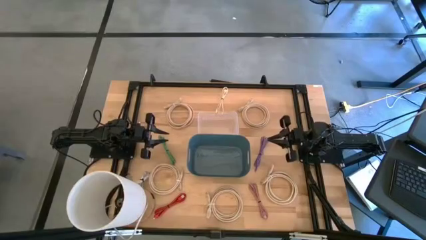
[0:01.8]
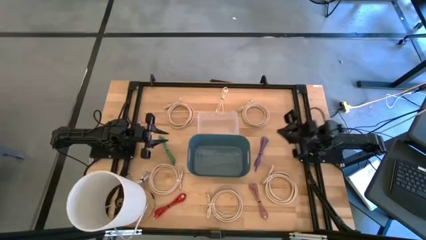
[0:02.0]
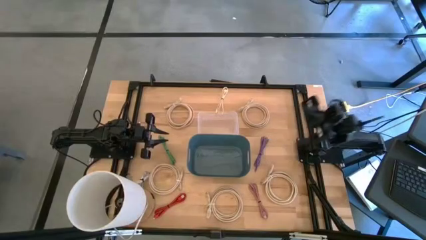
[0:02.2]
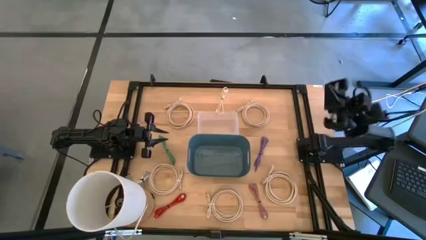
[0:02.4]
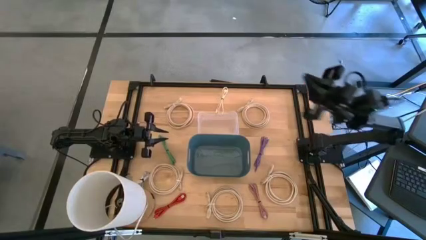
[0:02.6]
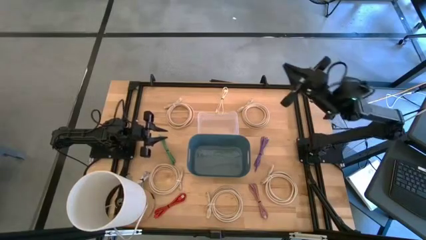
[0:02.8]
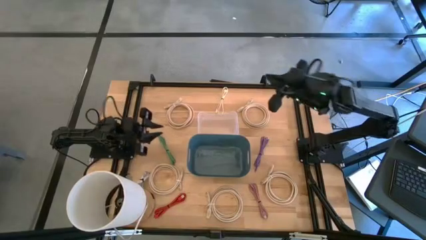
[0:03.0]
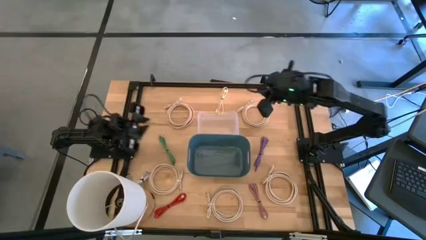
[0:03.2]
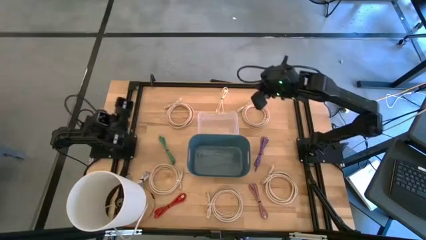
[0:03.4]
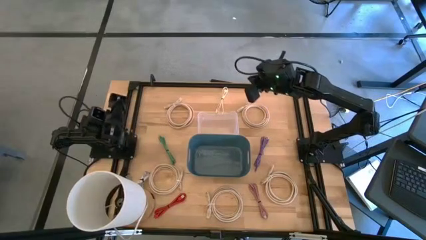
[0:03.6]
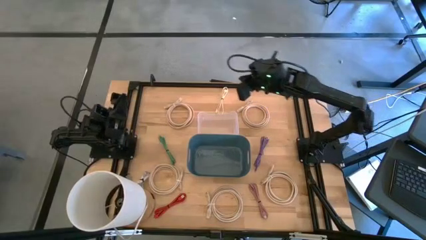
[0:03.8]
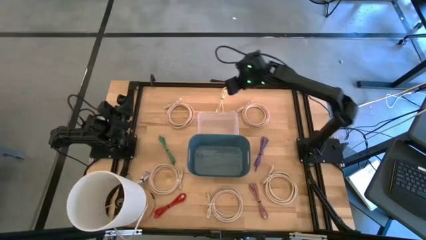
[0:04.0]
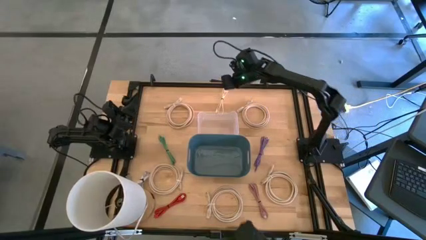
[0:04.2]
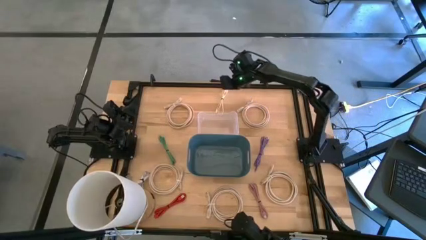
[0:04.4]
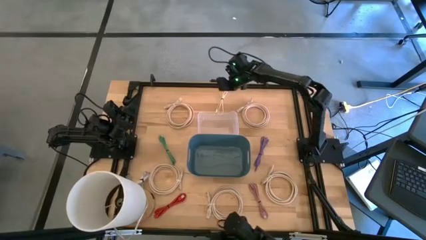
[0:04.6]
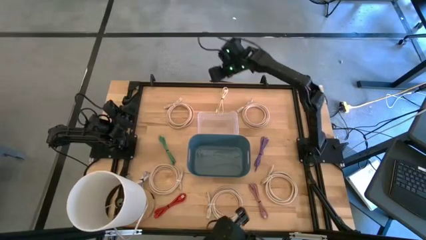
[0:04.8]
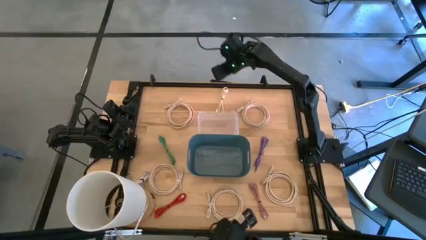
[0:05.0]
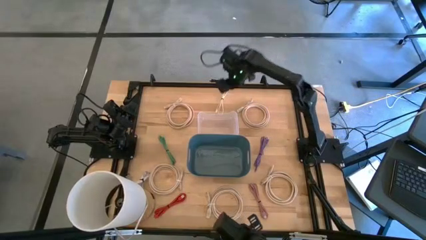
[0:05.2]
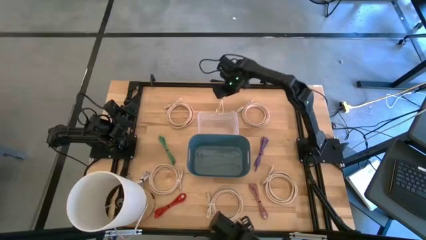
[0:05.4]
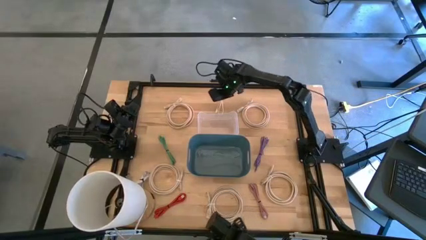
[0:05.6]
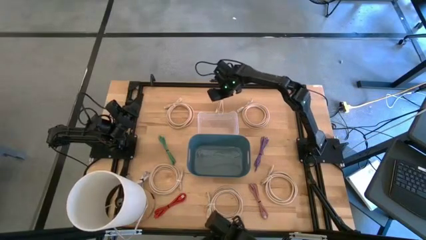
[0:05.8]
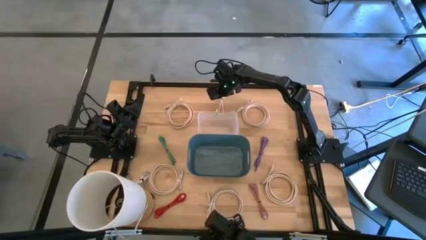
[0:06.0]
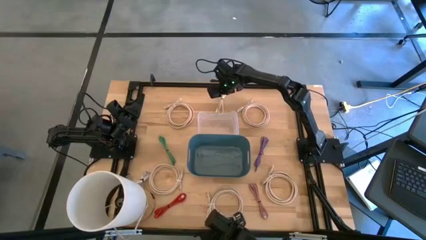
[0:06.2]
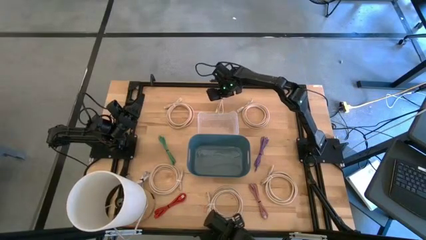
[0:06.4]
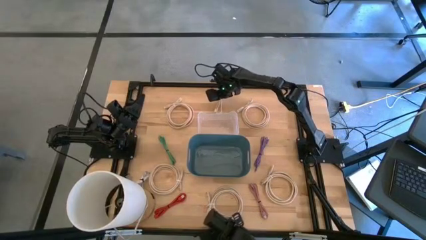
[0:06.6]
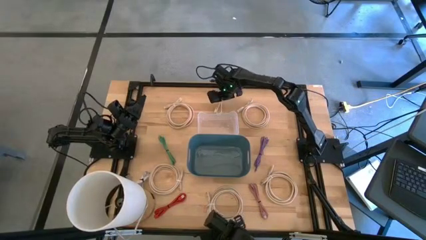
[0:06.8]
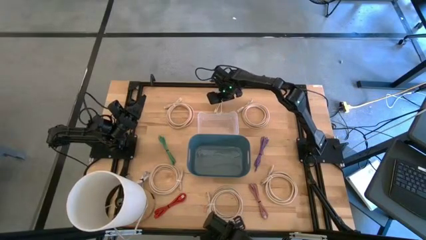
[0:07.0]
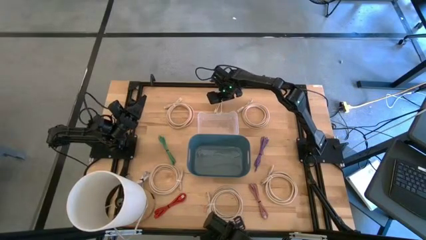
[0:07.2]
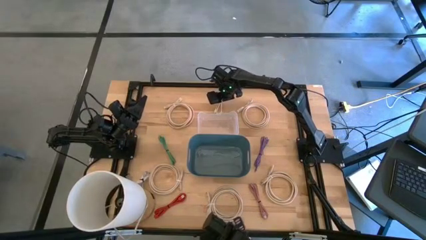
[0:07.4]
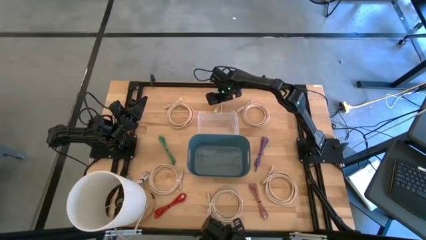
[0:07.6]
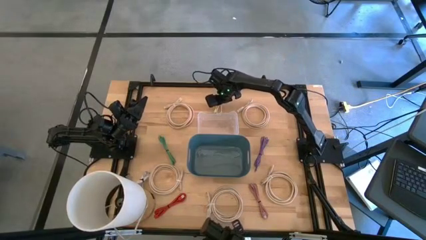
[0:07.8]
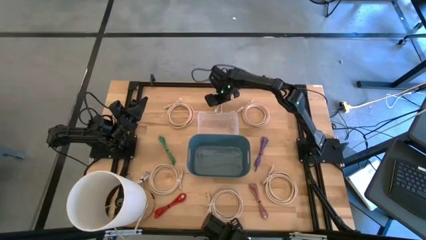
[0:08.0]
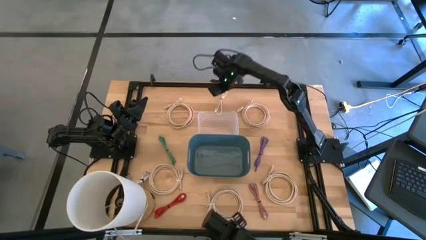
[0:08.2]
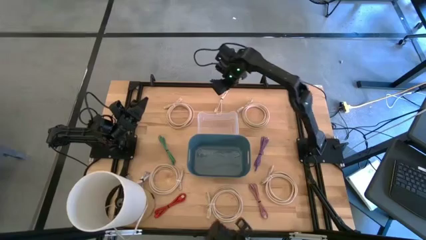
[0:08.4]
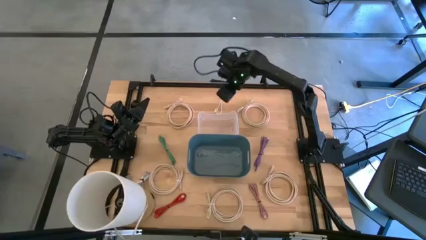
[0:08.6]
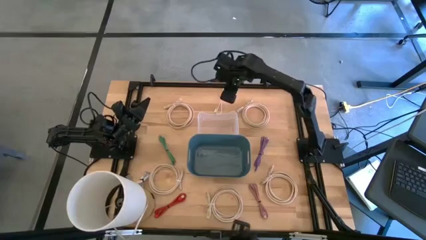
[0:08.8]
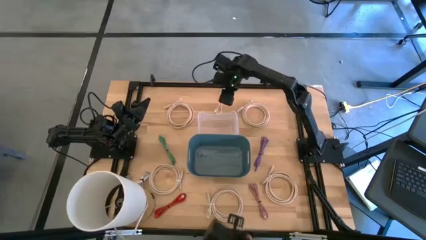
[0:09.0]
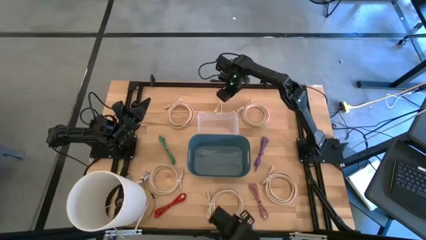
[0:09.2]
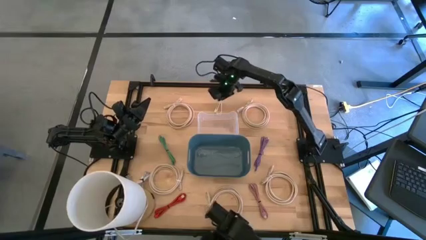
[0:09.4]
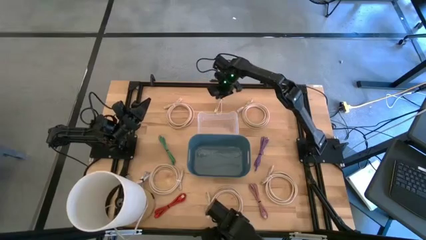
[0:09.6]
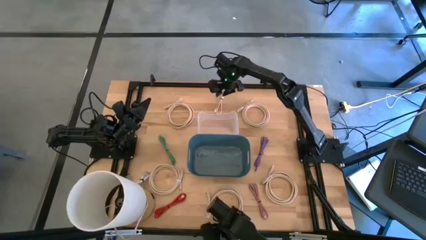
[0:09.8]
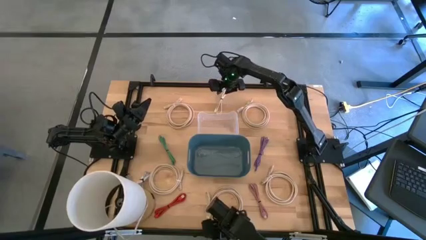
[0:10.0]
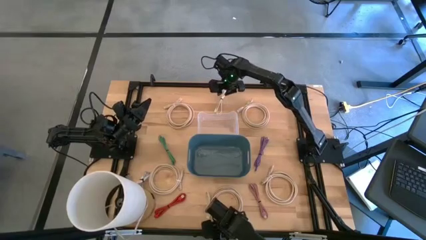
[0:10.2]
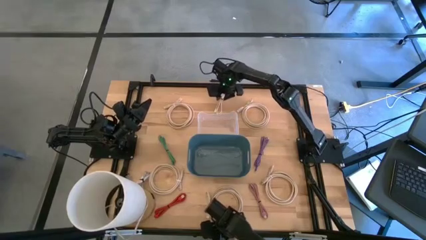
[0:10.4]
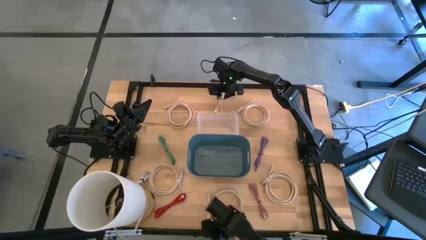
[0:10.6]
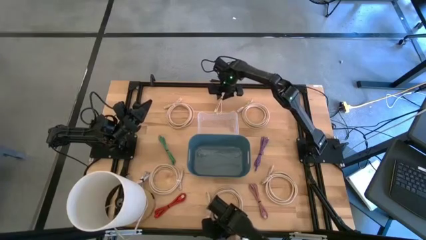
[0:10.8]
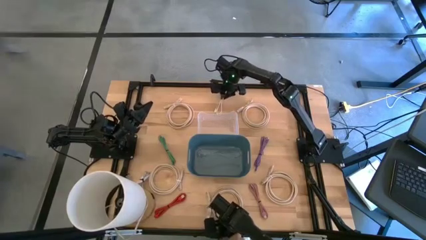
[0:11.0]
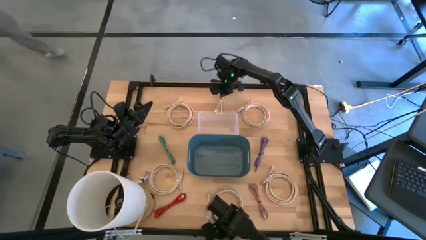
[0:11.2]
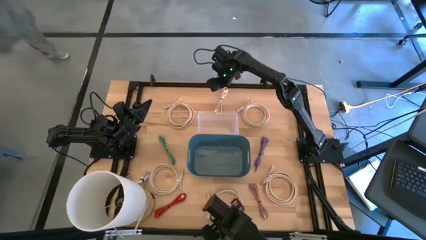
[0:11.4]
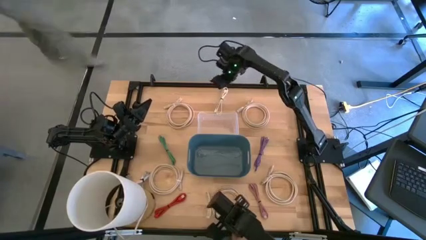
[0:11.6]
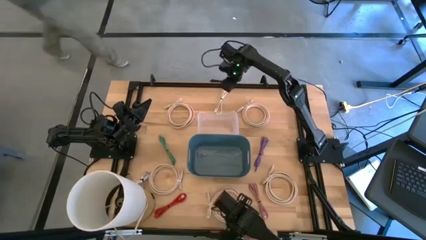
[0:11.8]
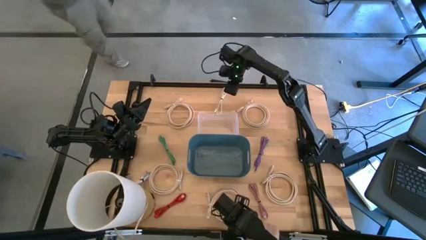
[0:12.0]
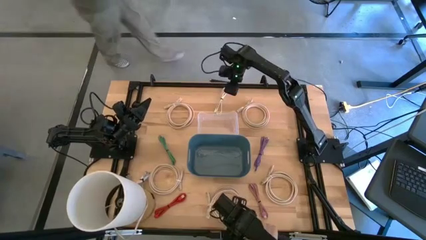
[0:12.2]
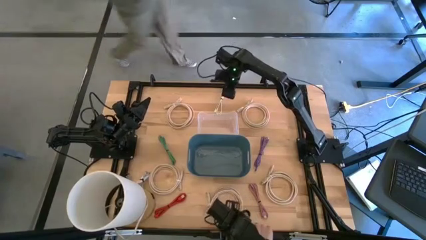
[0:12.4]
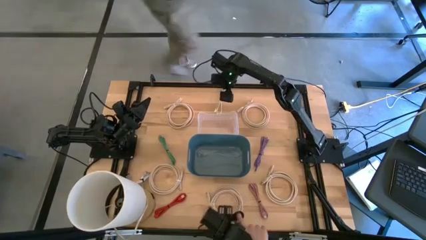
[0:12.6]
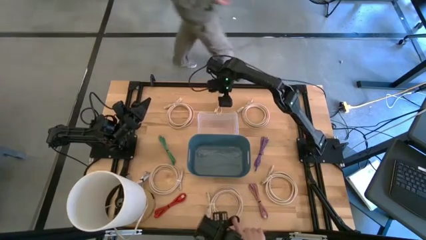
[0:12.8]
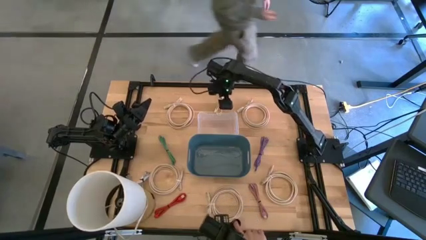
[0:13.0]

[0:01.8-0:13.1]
Put the white charger cable into the transparent bin

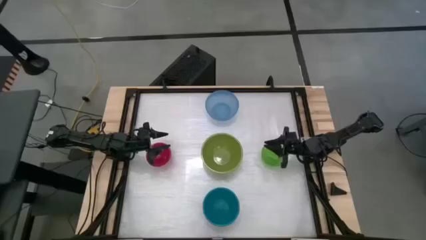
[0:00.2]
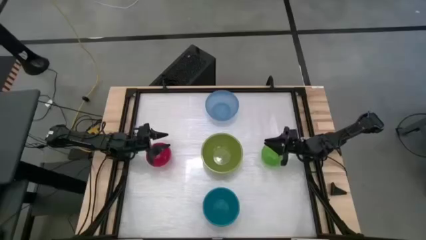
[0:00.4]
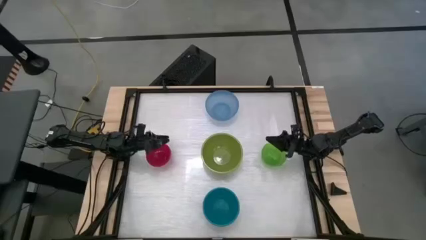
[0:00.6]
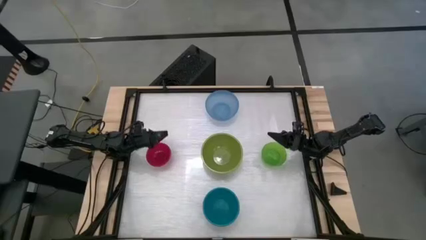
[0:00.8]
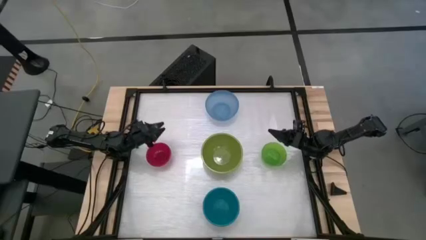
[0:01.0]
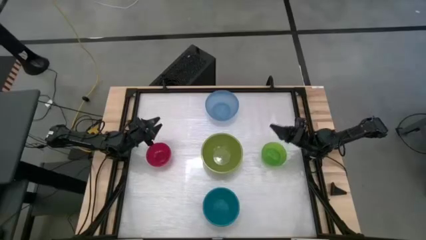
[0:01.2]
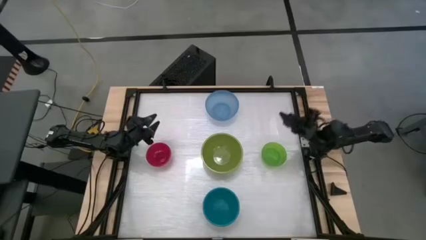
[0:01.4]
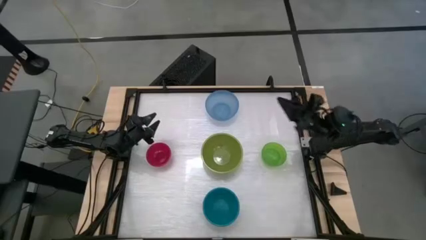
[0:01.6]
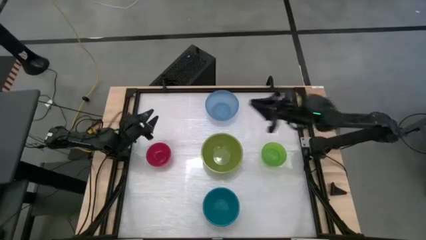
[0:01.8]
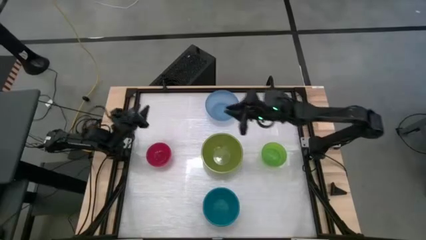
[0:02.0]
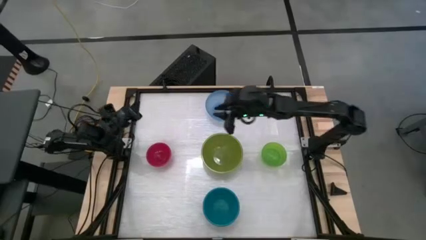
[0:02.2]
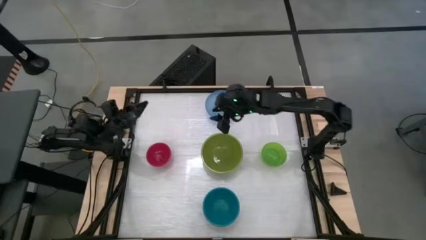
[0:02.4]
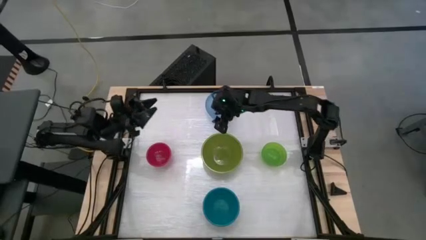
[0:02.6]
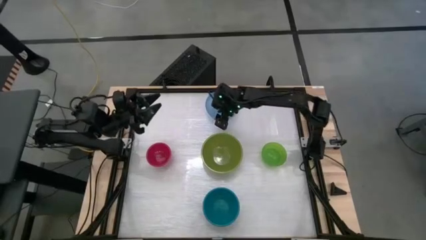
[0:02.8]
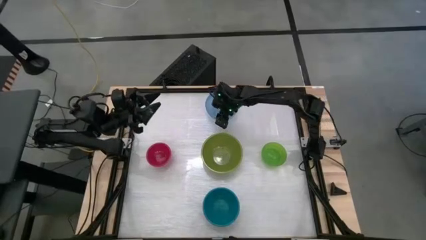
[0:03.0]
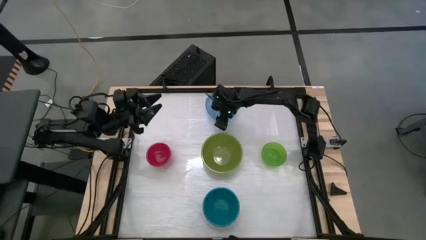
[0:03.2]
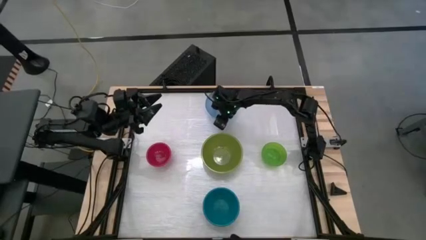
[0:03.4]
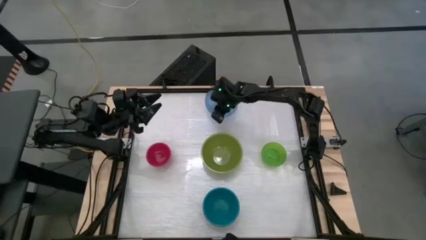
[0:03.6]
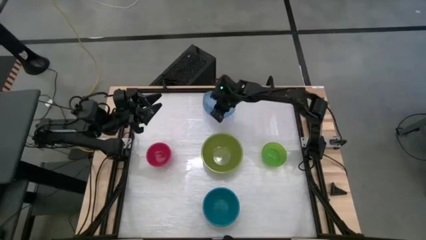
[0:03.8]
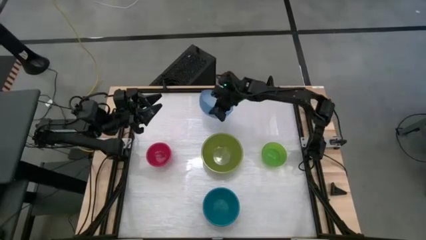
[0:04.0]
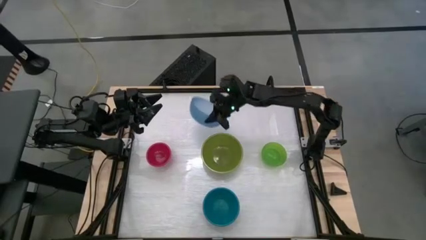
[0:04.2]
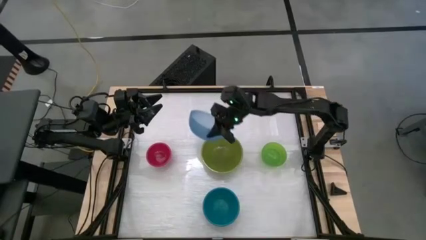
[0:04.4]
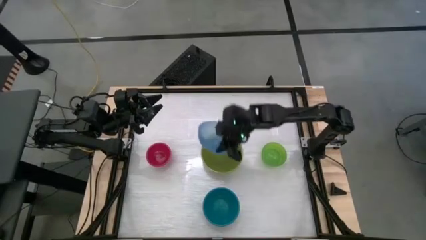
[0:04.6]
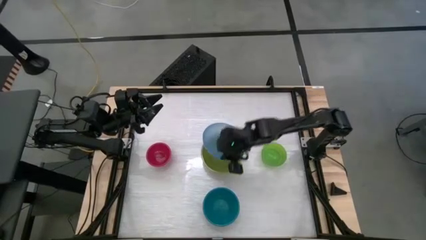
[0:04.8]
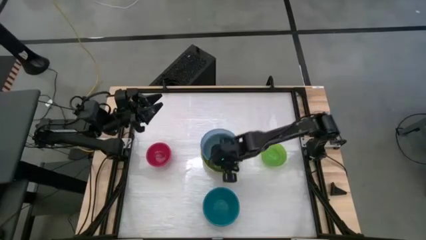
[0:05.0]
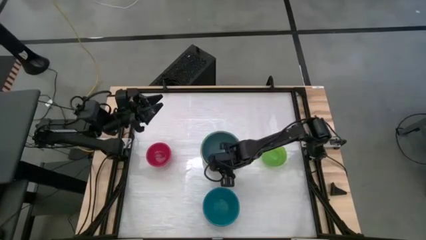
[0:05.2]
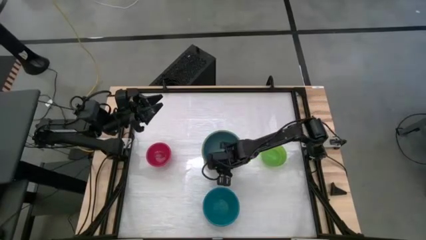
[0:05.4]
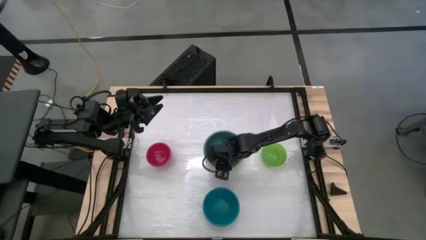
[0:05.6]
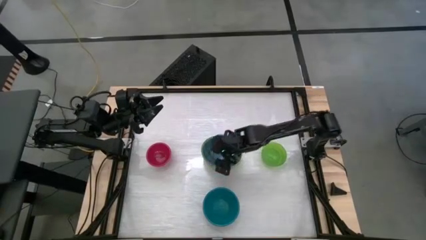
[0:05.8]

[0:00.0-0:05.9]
Stack the transparent blue bowl on top of the green bowl
